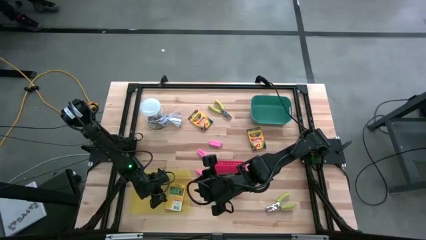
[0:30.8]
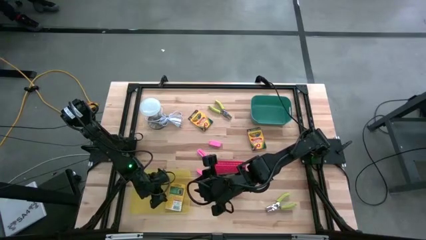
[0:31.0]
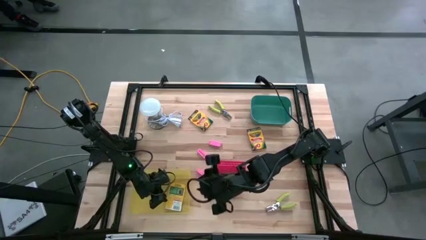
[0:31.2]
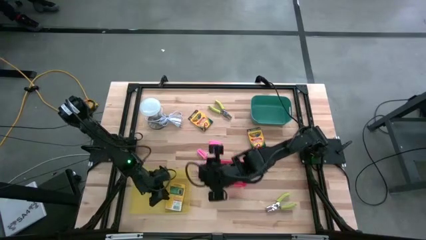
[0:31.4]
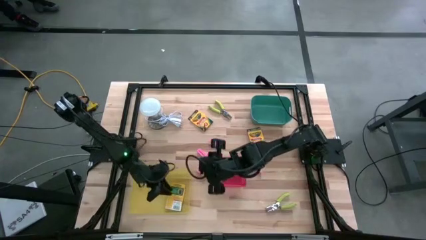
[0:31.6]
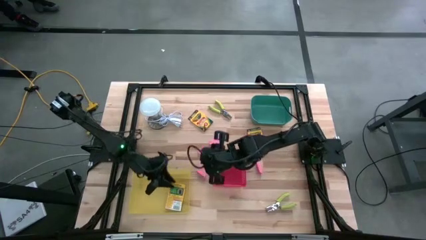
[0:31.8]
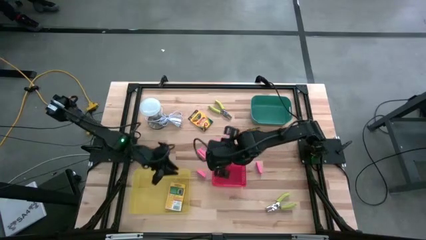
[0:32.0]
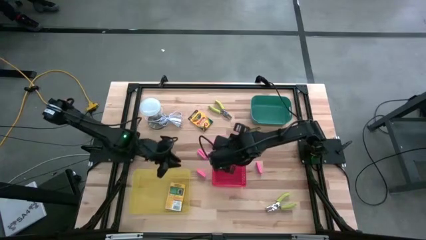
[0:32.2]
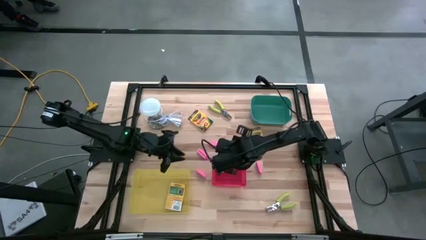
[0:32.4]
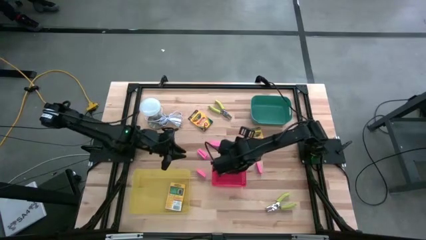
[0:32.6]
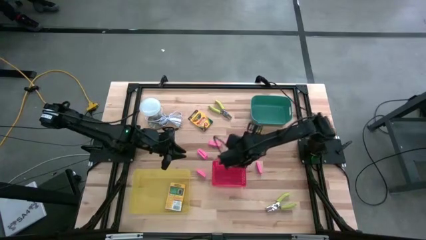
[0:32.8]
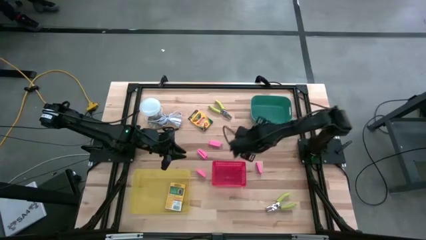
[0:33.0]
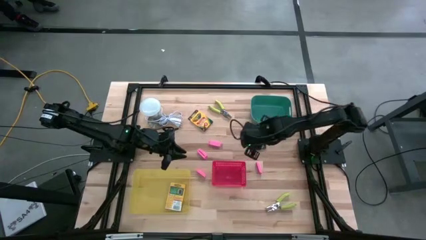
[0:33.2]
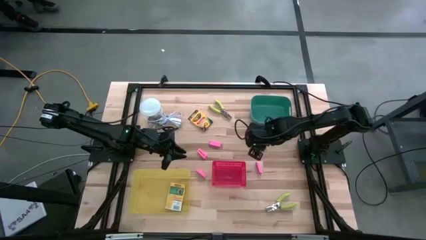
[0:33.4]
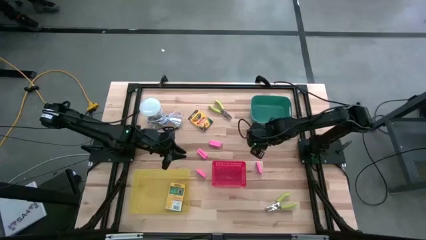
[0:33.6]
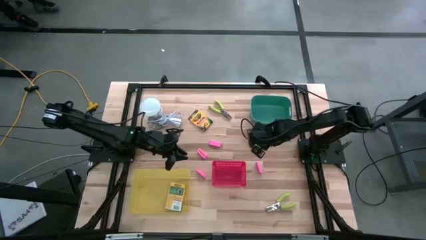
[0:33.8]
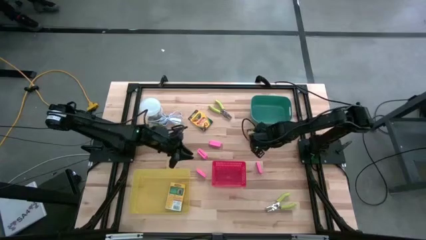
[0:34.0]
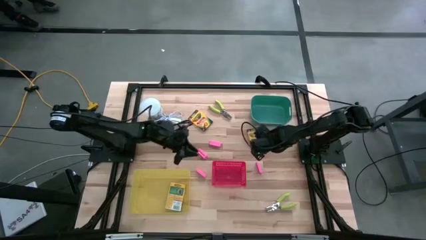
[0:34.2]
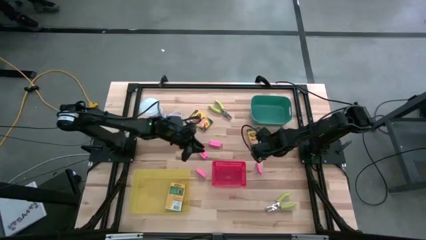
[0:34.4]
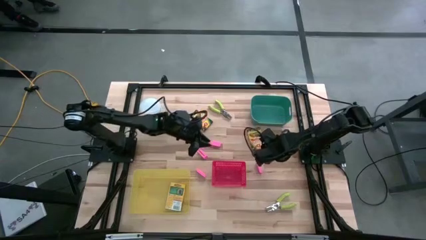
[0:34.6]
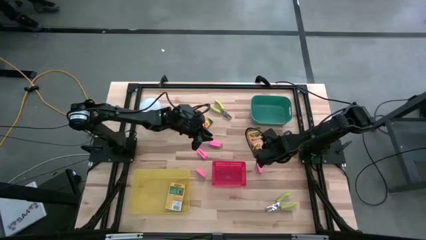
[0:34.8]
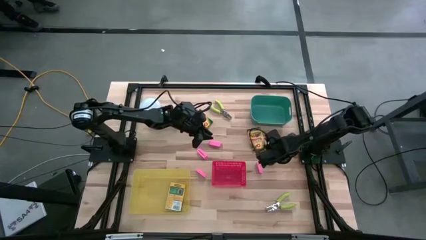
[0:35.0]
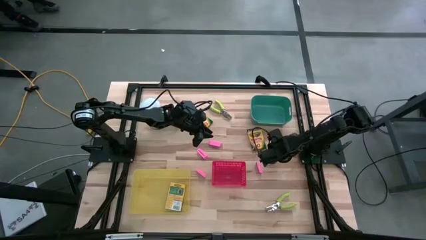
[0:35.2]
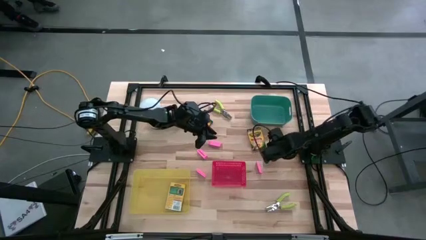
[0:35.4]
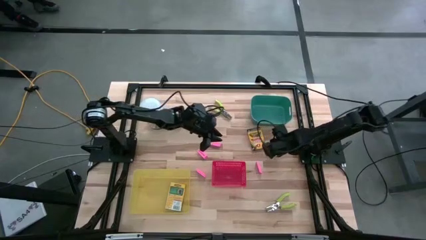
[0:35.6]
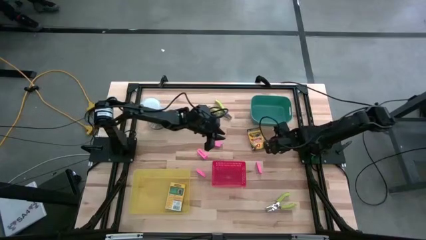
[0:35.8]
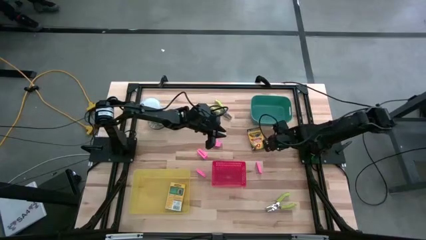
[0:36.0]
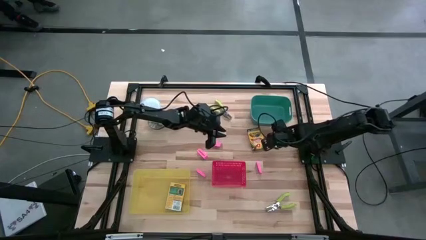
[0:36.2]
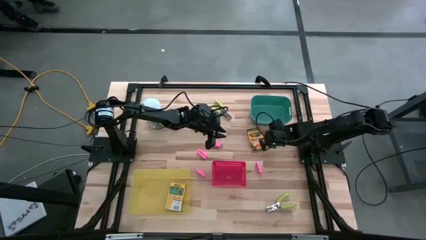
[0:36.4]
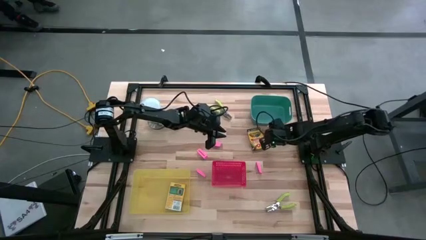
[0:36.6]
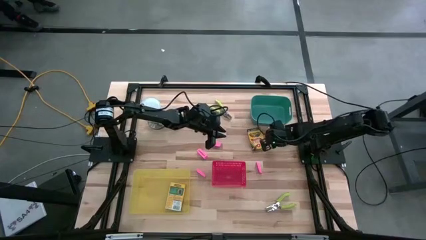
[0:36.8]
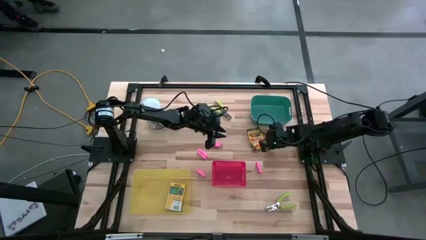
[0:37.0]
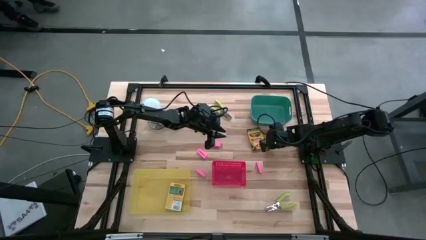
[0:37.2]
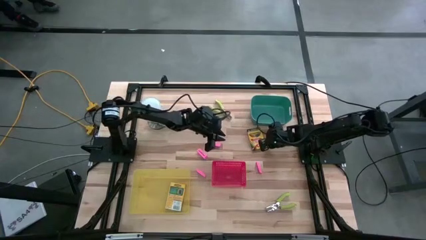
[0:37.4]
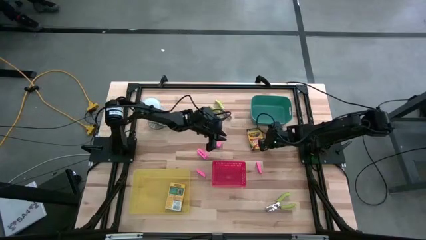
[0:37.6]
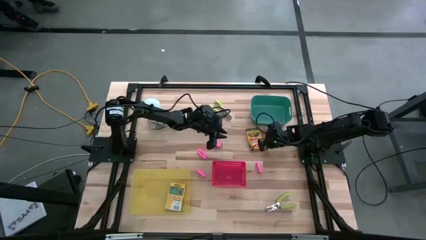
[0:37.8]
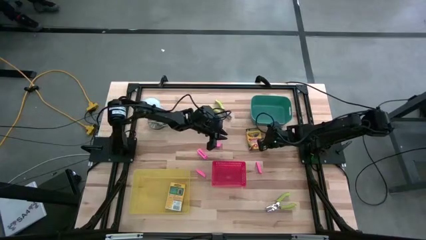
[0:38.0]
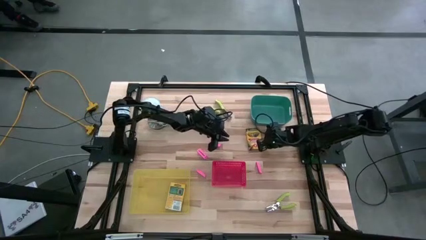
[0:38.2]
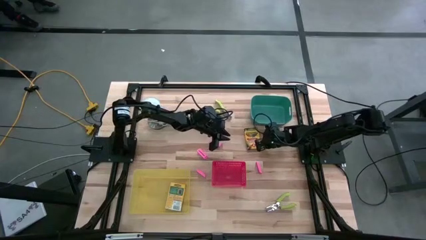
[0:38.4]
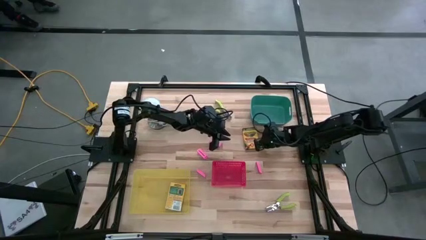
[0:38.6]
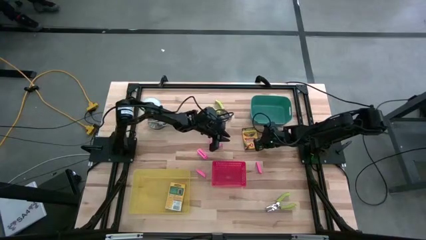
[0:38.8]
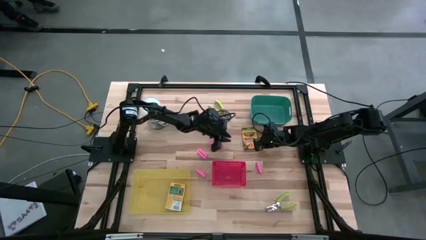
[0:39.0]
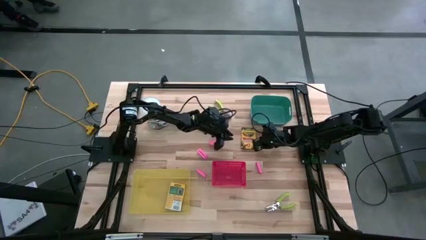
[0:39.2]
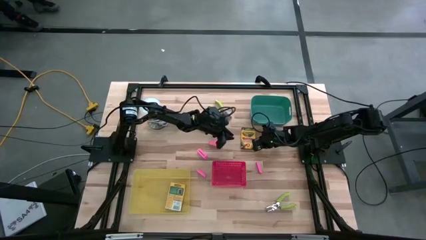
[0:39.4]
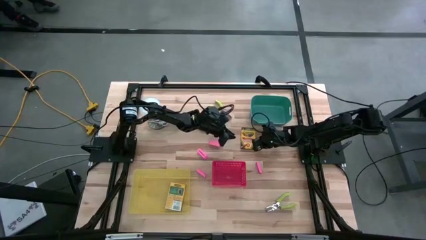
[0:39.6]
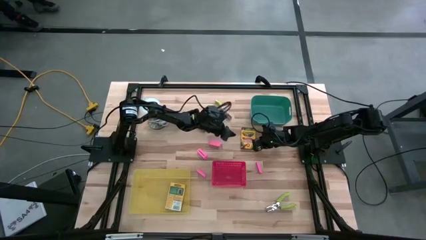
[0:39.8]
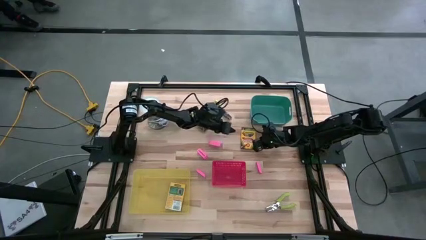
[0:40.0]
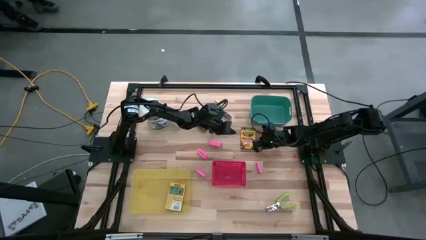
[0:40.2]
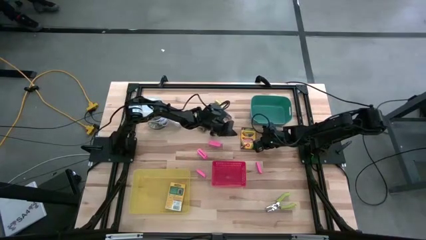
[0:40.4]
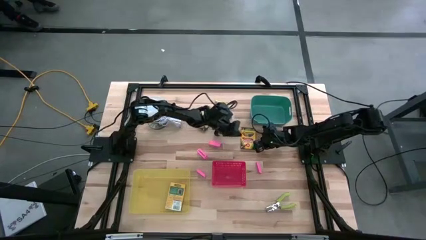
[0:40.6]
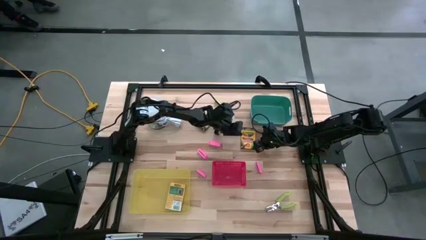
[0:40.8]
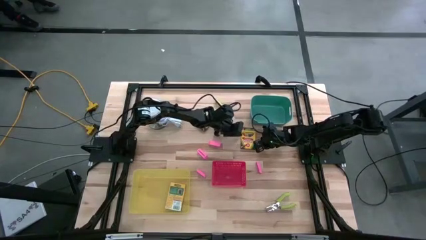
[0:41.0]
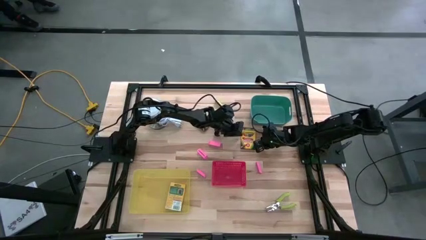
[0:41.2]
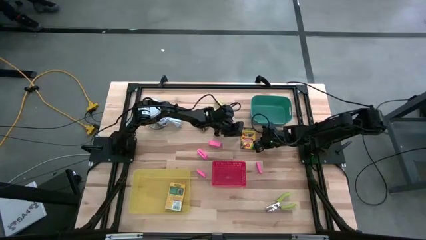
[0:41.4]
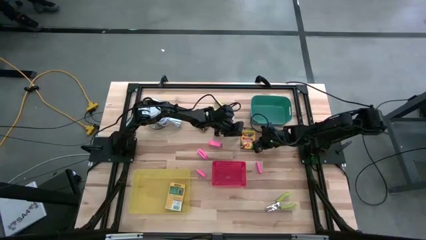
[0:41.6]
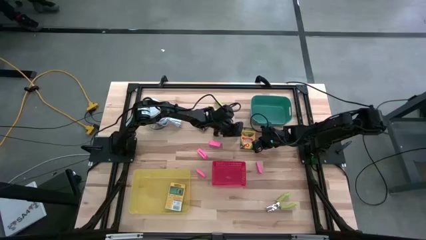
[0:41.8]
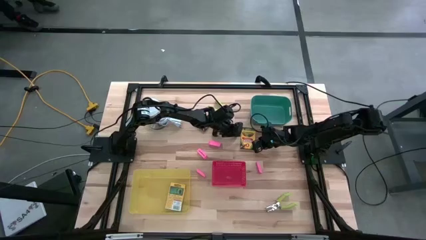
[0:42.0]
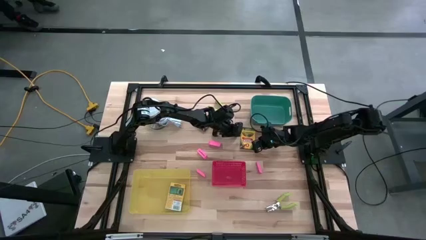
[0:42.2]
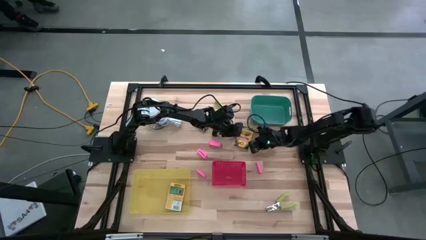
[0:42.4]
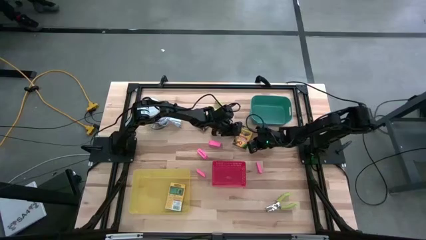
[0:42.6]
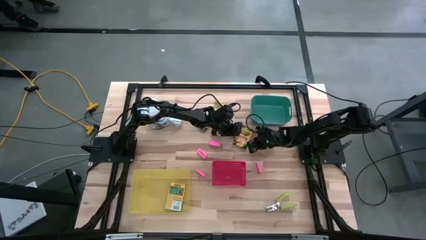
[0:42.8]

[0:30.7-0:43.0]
Task: Pick & Place School Supplies
Put the right yellow crayon box into the yellow bin
